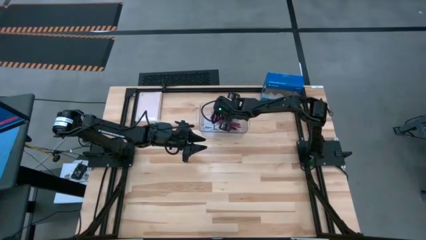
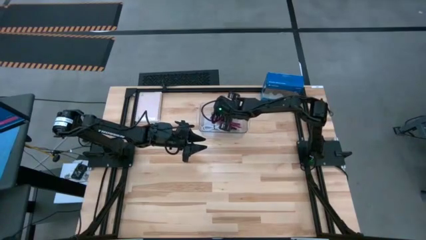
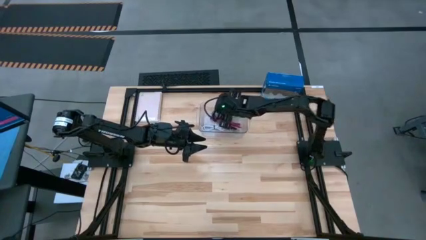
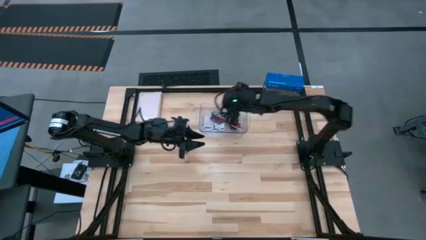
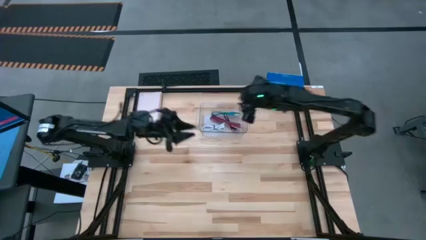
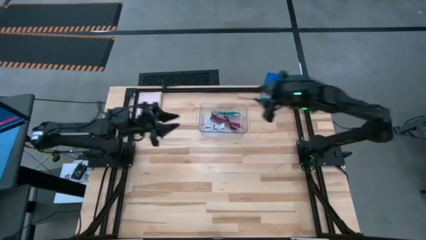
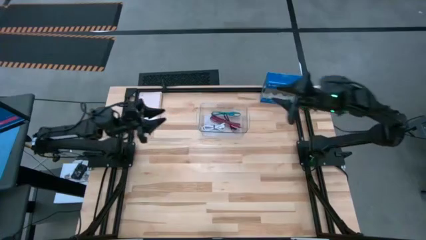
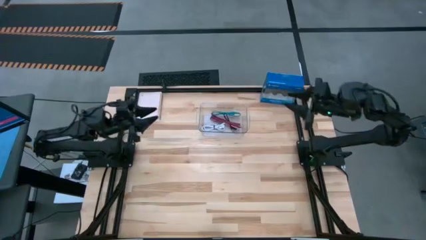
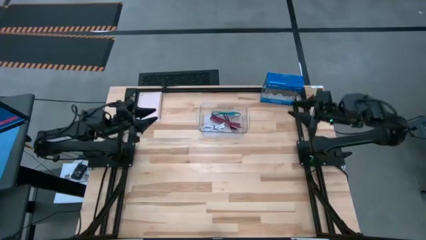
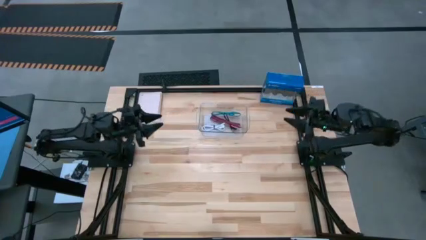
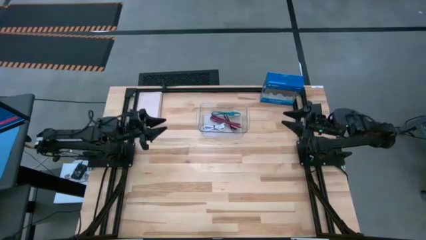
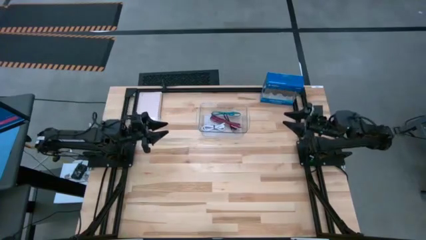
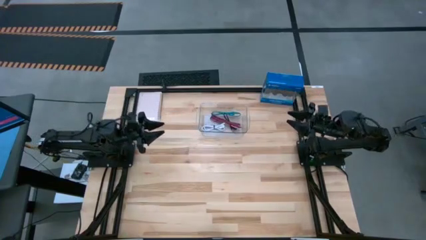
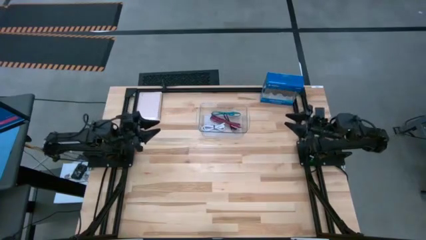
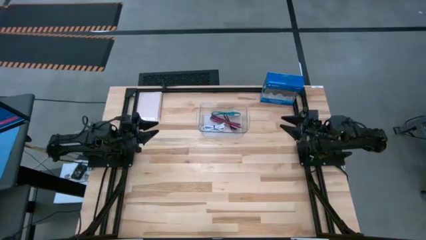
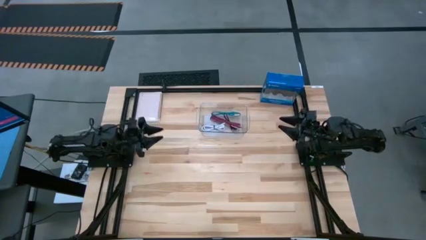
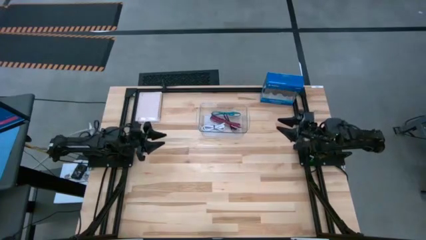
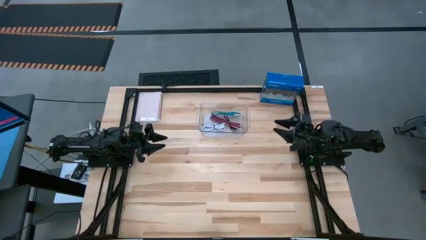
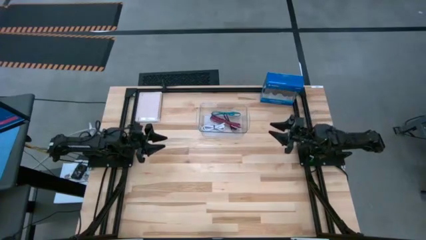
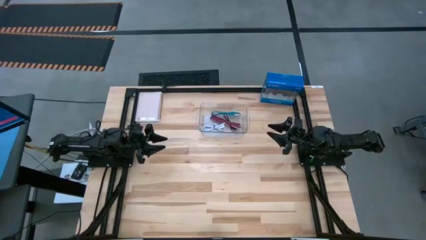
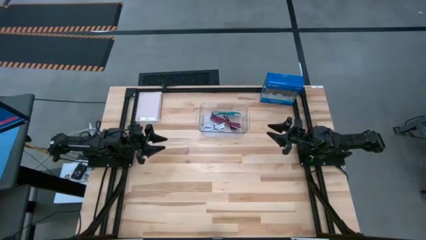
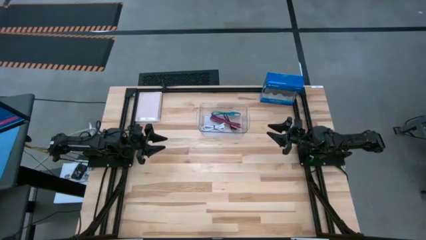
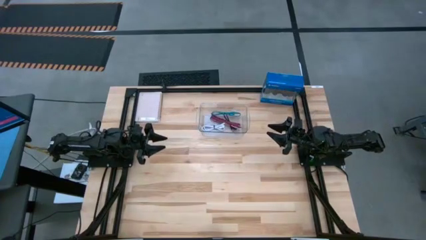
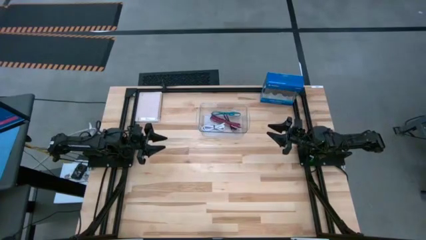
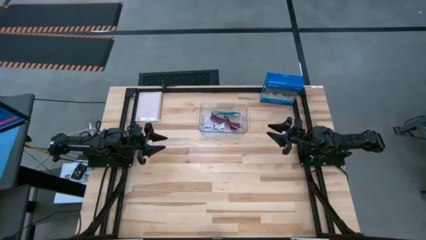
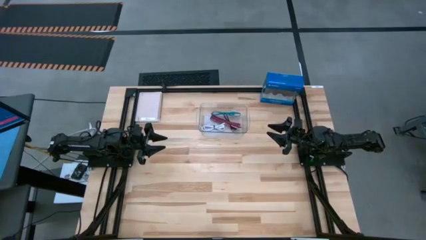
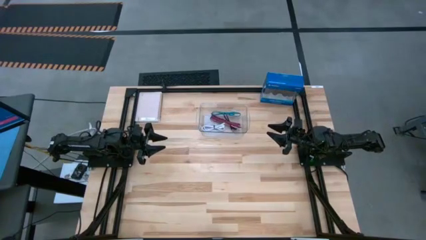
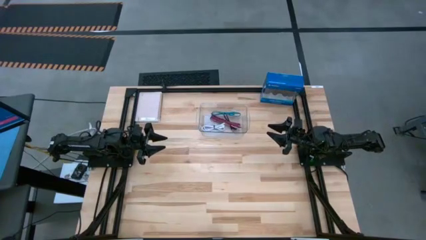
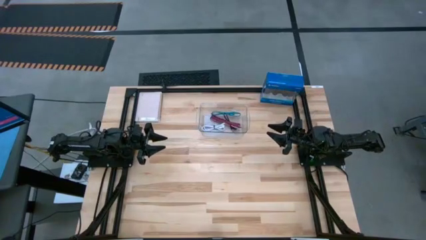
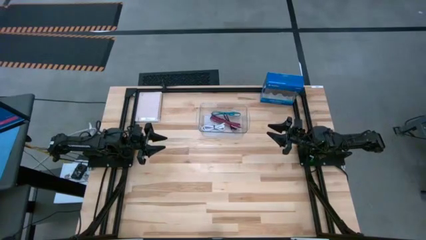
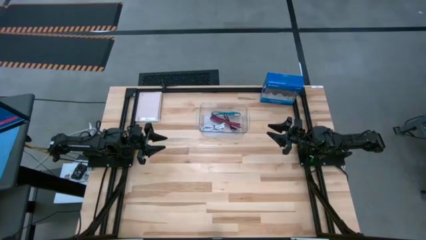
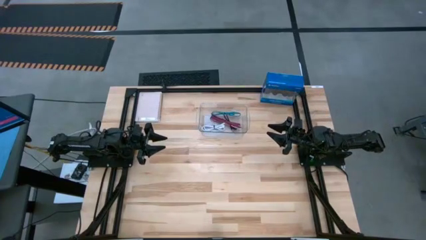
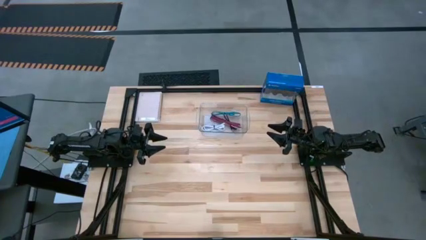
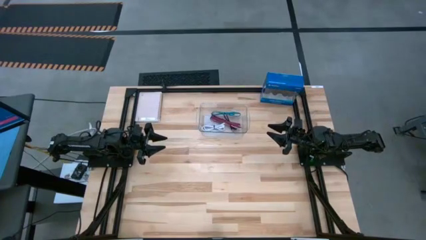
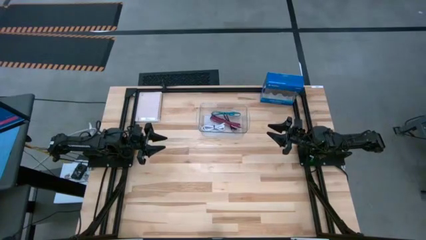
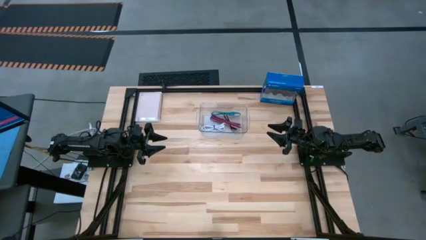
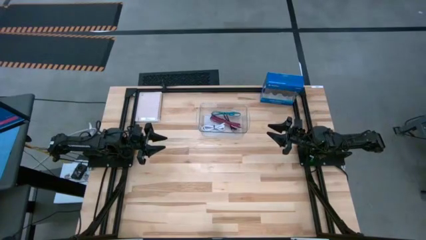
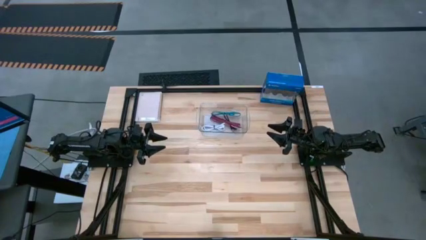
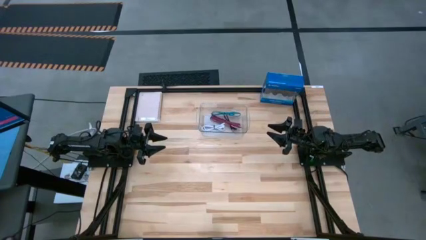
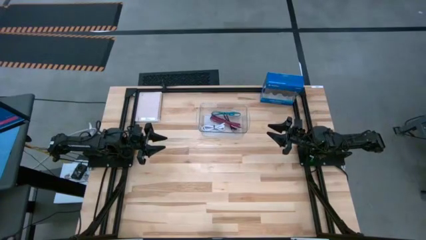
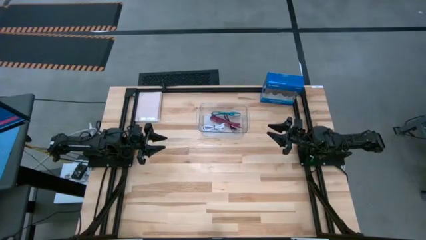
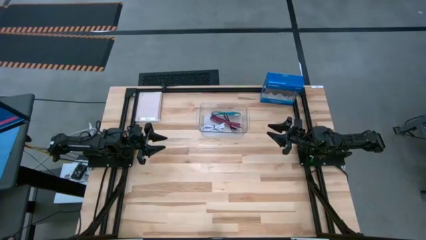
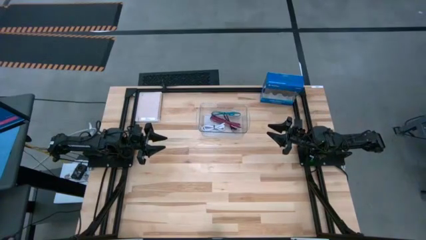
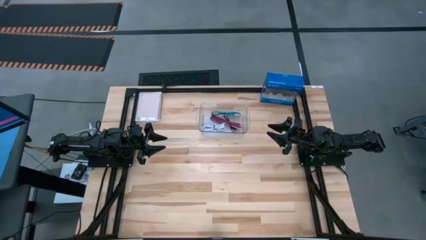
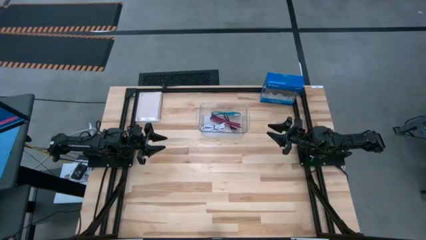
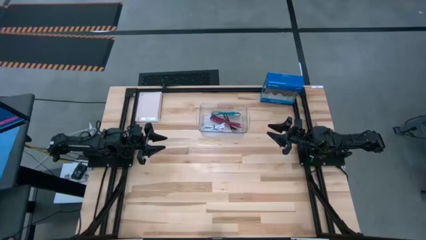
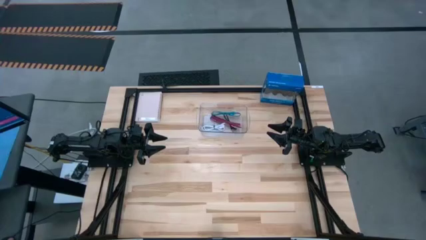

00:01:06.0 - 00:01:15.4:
Task: Pick and place USB-C Cables
Return to Home Position

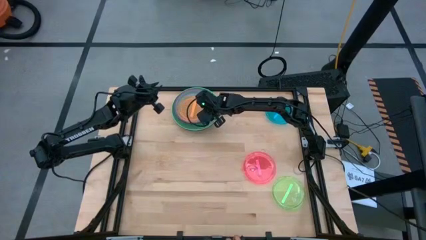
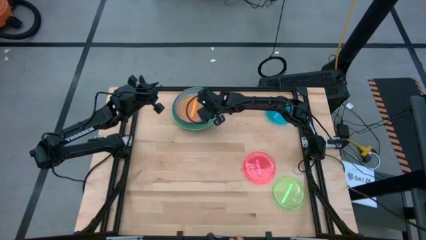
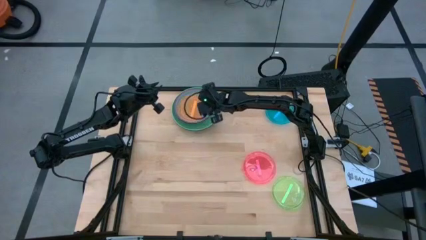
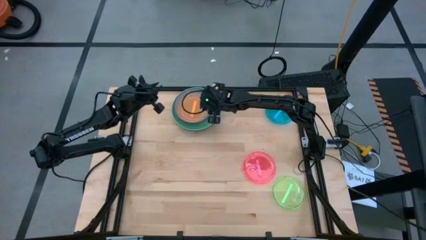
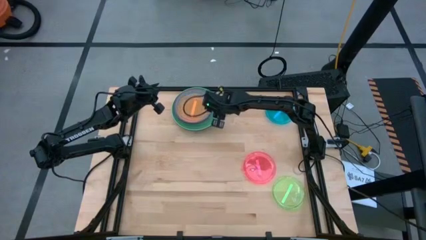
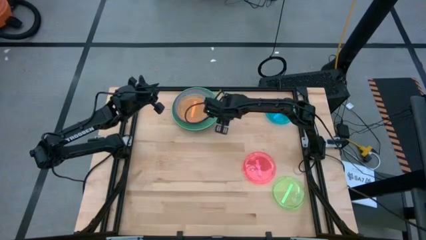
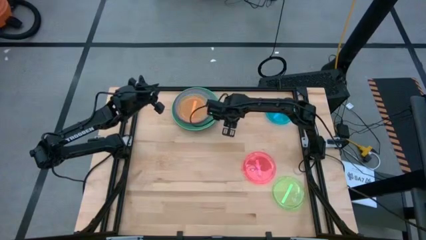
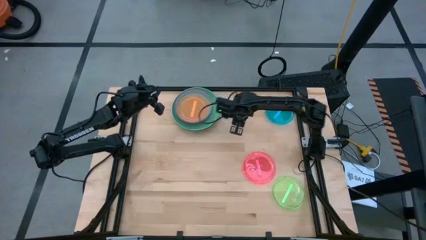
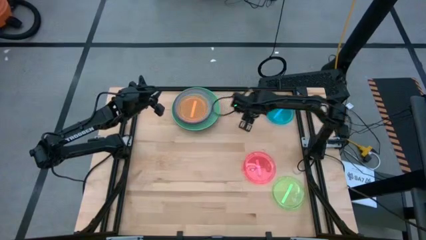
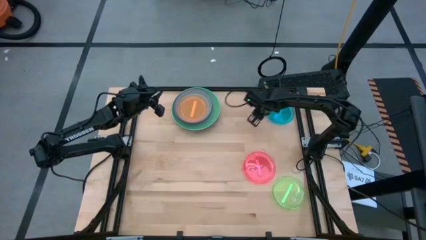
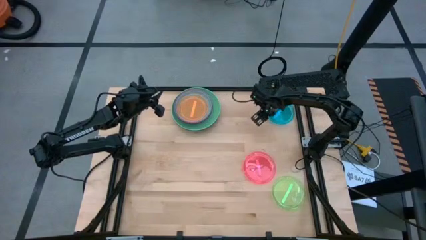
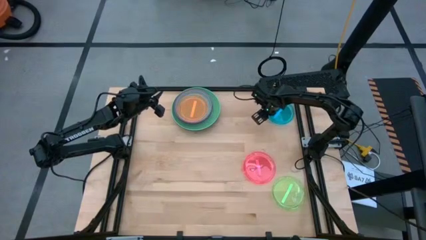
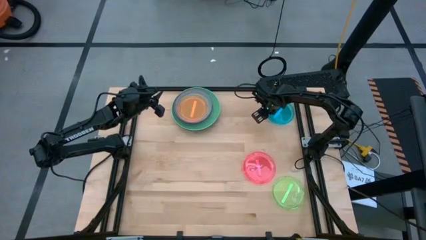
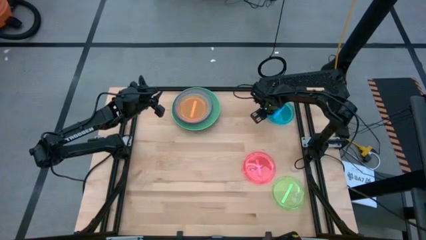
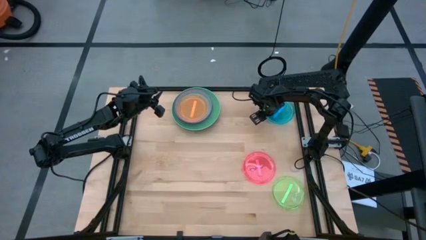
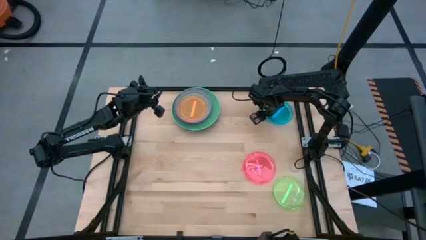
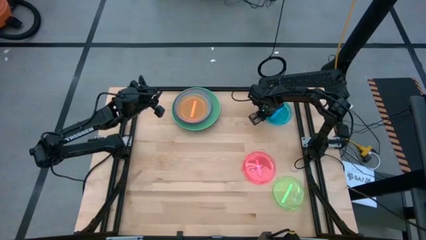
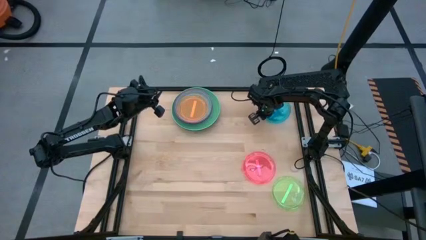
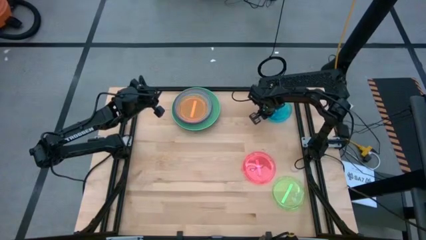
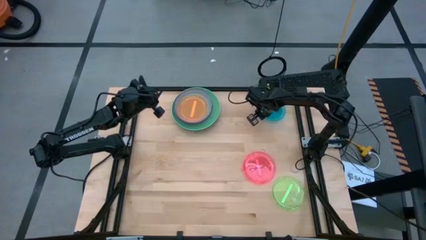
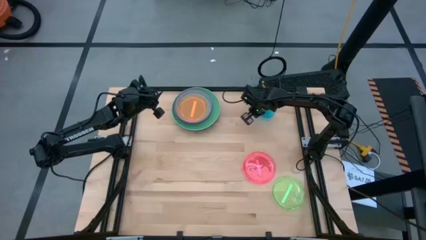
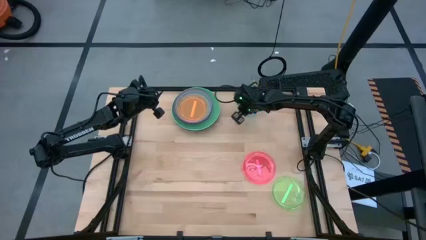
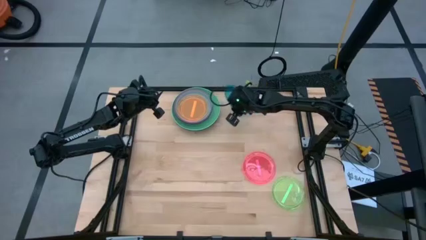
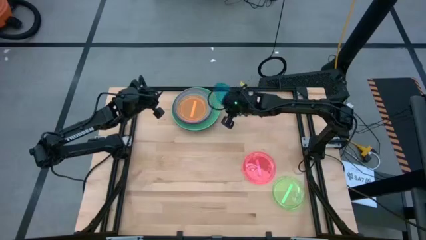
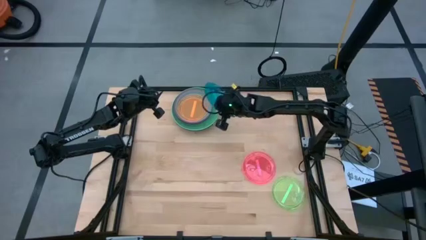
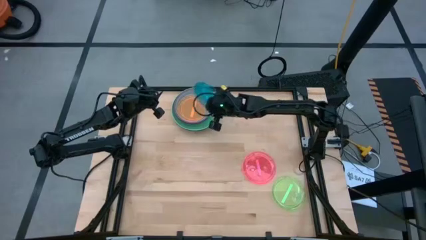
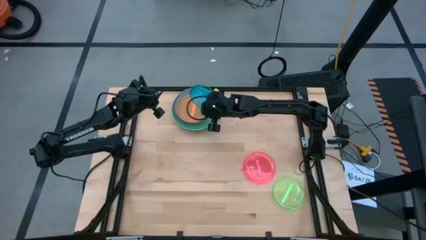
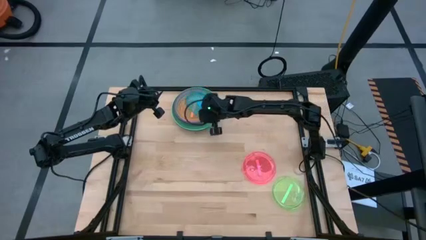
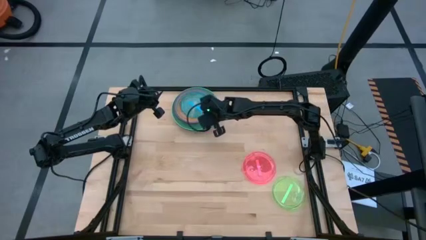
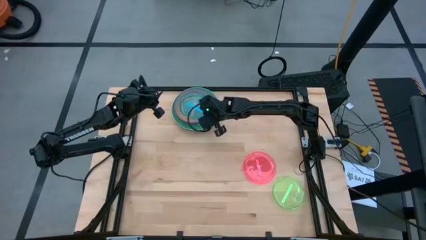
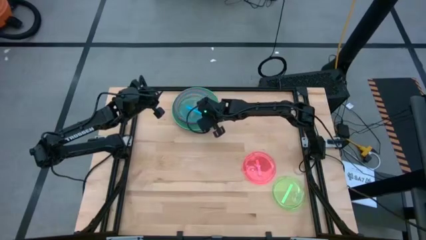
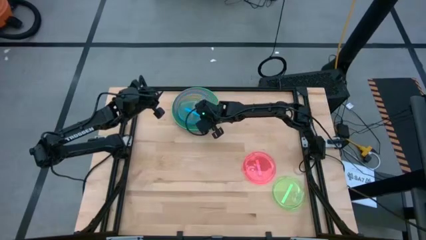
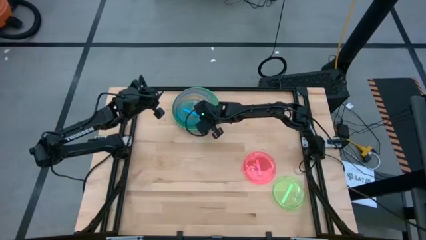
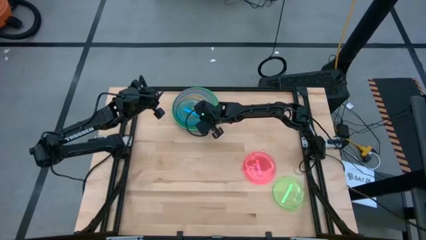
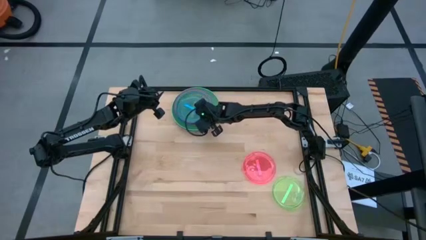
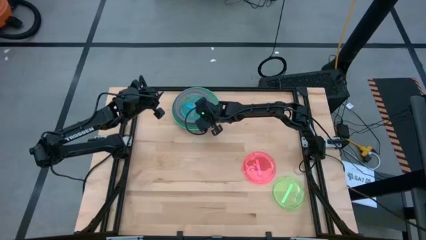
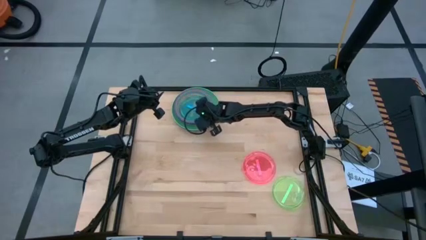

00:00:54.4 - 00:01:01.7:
Task: Stack plastic plates
Stack the blue plate on the orange plate
